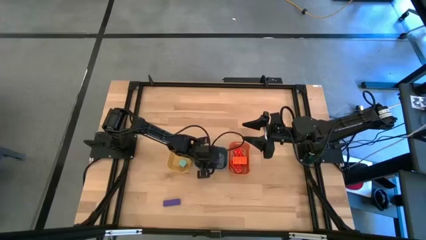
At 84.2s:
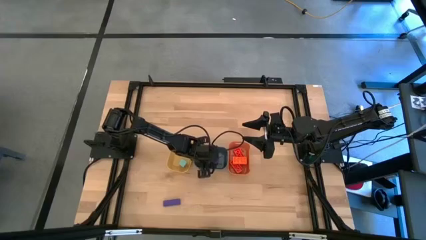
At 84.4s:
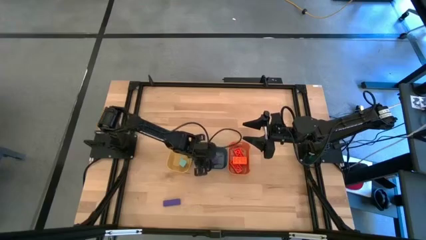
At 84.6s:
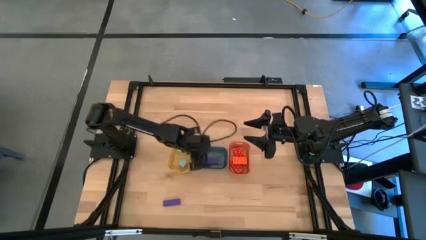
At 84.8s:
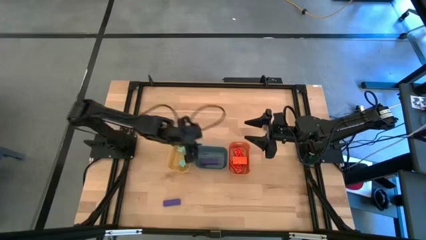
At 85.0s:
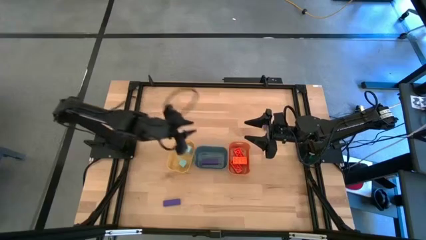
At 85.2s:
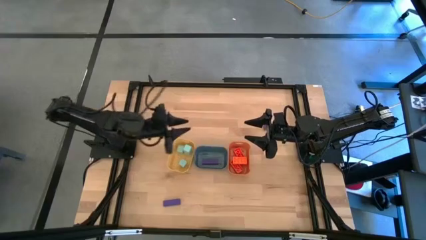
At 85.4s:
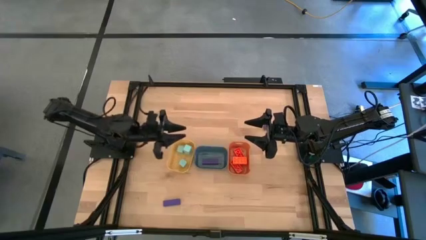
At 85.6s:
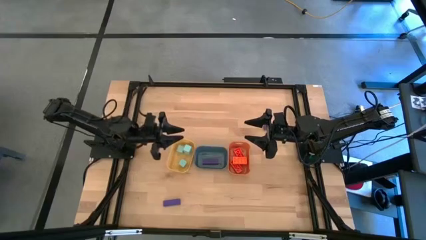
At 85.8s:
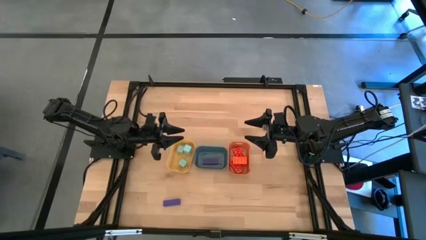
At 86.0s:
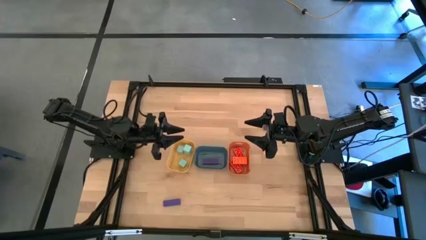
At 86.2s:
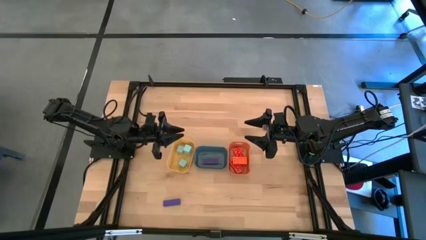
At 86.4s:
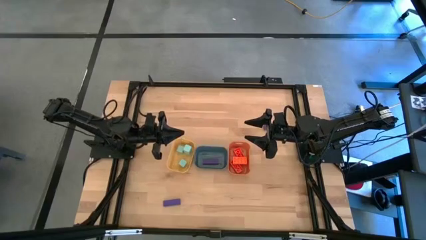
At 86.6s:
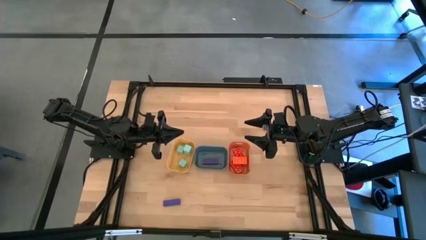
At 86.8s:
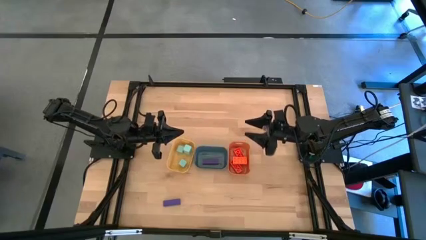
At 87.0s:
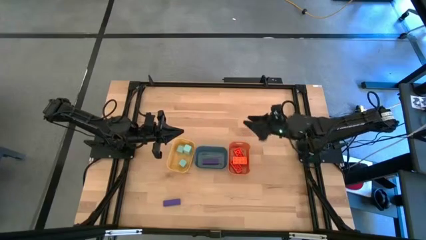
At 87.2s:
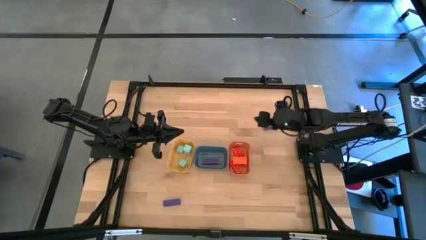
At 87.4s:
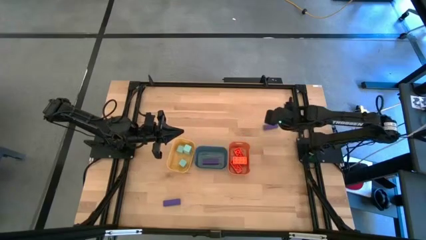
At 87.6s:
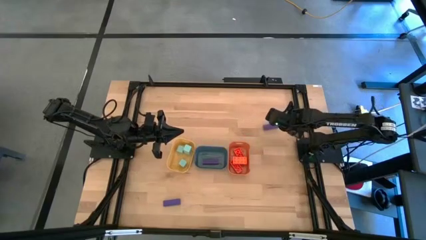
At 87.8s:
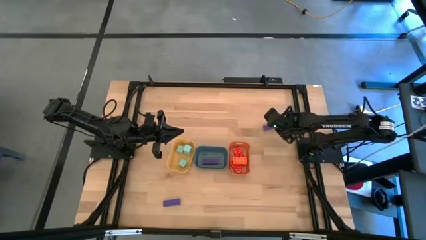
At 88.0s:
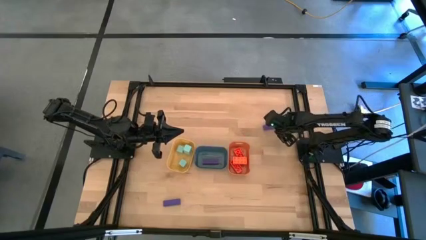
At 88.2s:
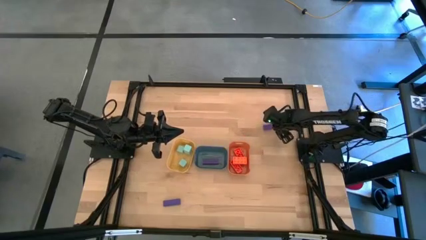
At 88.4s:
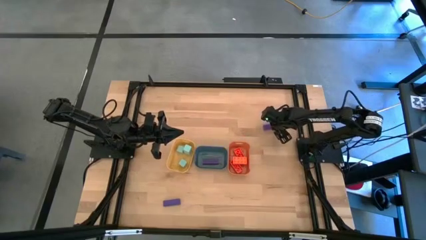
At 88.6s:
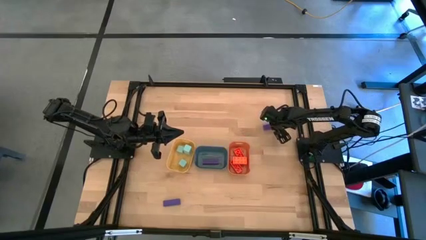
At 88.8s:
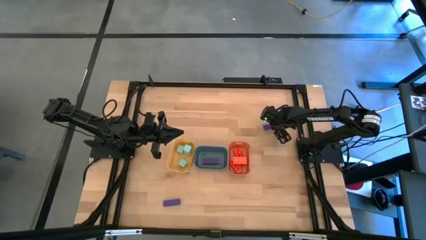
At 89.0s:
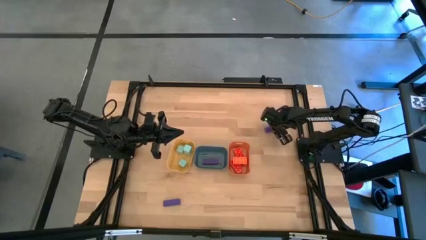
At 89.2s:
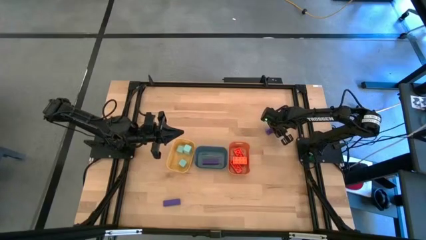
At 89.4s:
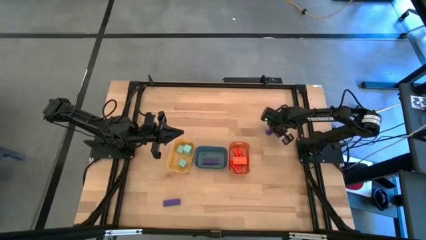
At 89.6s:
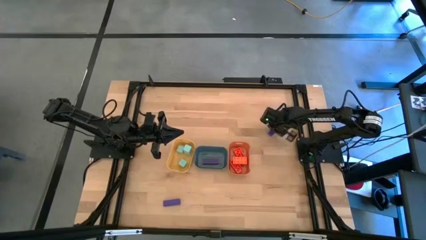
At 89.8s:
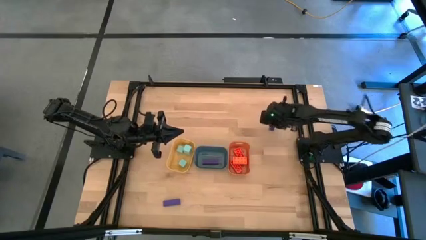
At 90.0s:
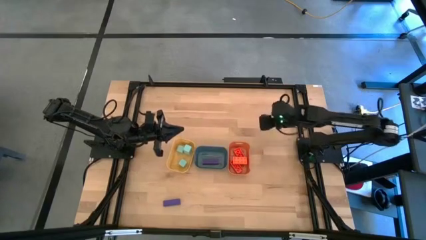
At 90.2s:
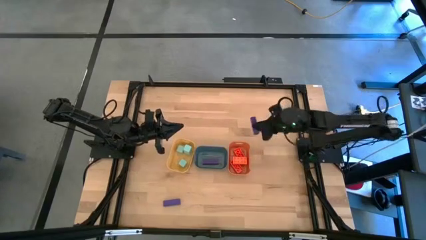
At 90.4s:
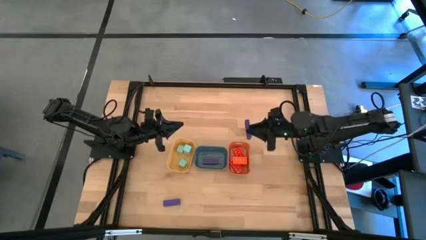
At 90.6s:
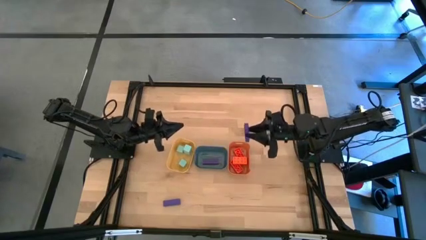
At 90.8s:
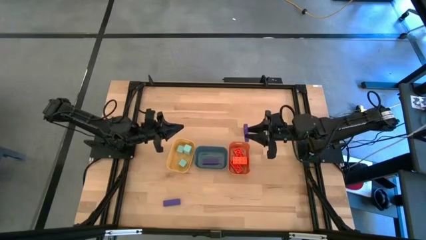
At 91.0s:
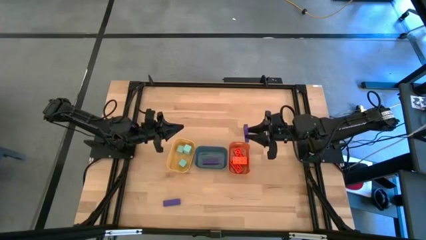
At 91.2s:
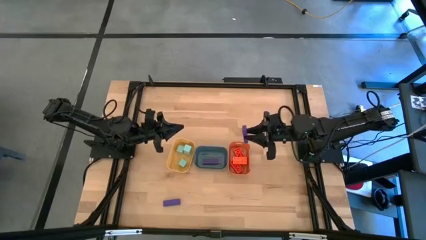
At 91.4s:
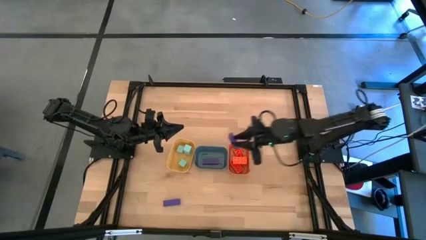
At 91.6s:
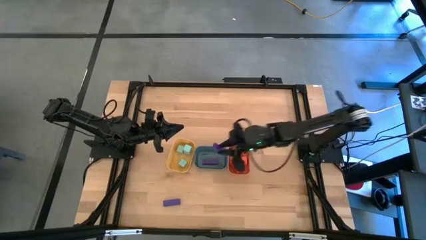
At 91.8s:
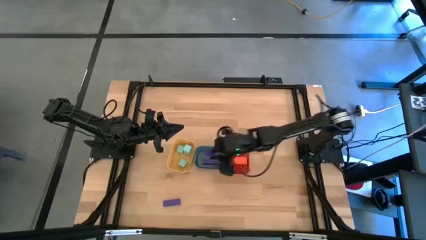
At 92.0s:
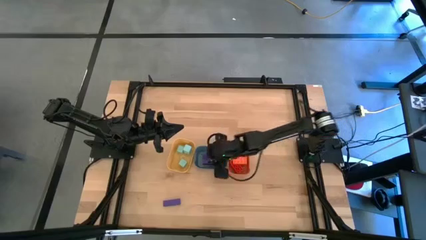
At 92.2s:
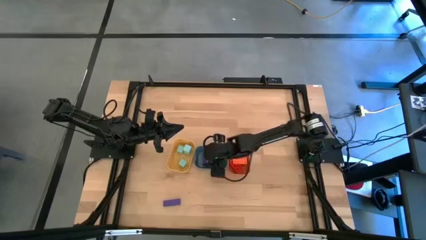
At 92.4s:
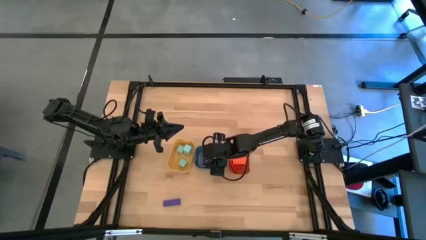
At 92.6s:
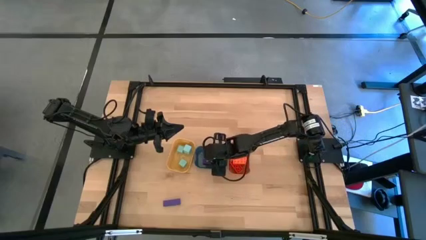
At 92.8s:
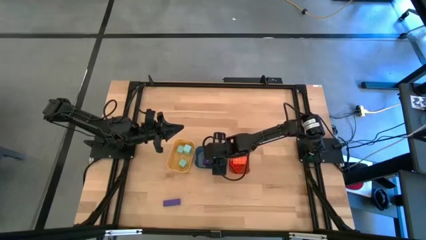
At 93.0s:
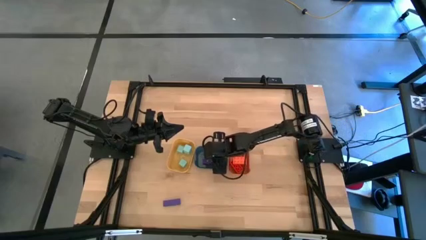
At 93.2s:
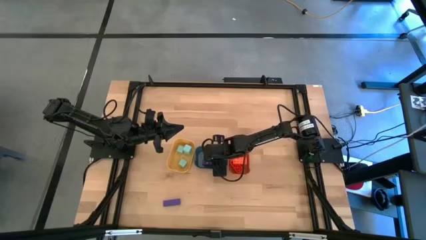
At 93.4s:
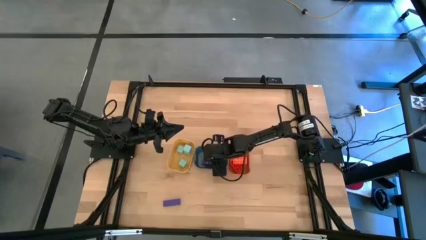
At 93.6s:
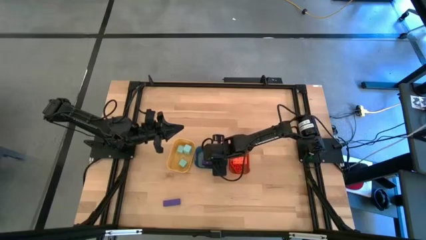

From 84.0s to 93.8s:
Task: Sort & place blocks by color
Put the top violet block into the blue bin

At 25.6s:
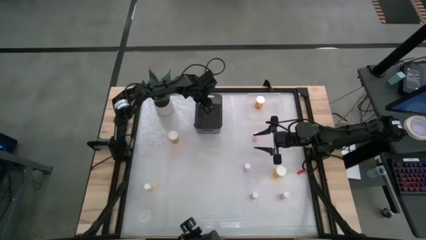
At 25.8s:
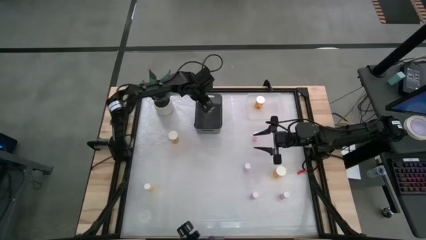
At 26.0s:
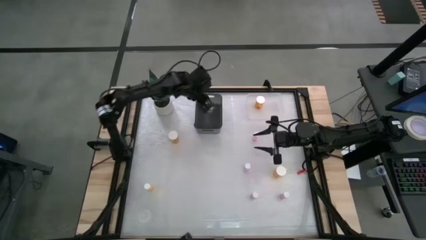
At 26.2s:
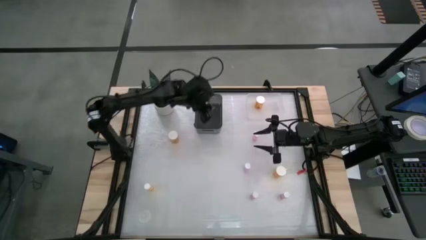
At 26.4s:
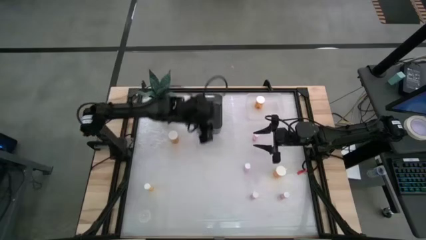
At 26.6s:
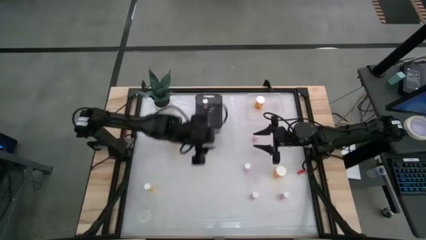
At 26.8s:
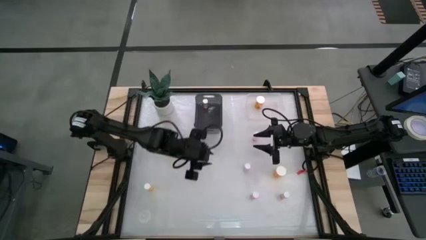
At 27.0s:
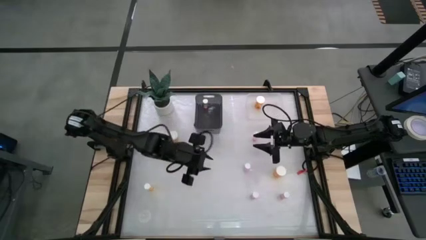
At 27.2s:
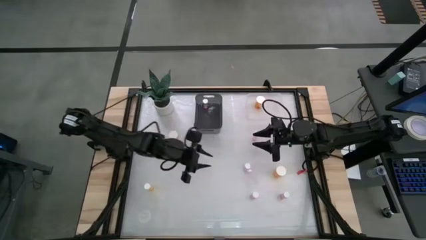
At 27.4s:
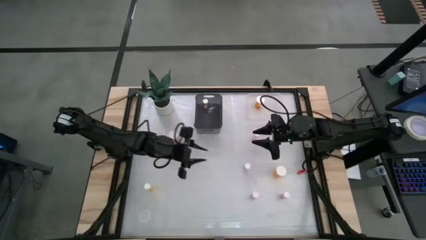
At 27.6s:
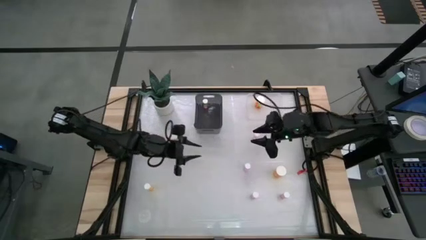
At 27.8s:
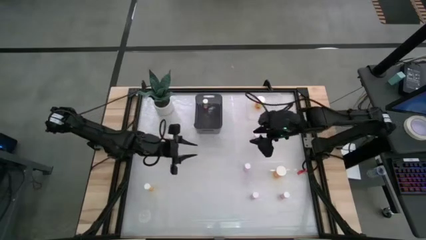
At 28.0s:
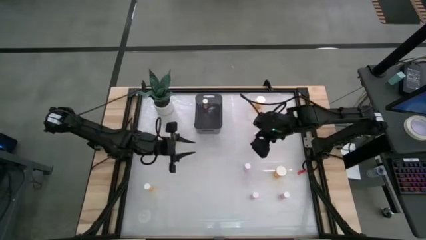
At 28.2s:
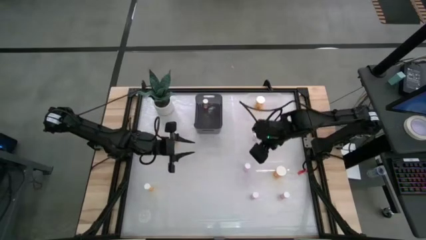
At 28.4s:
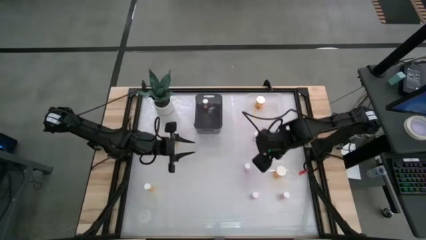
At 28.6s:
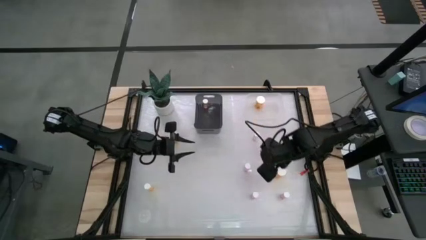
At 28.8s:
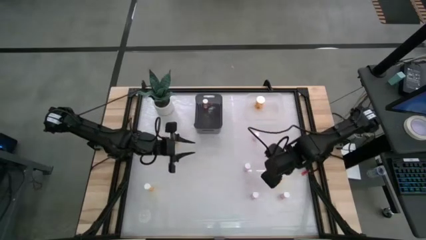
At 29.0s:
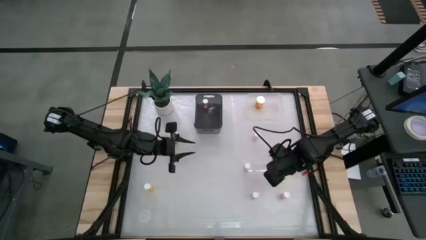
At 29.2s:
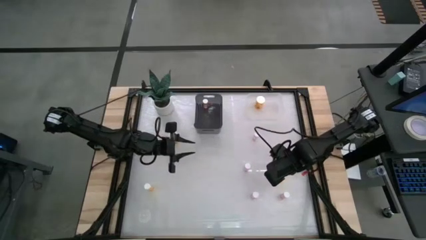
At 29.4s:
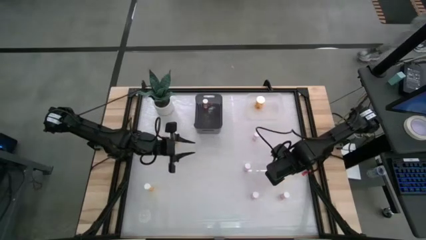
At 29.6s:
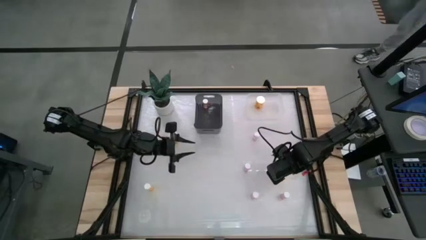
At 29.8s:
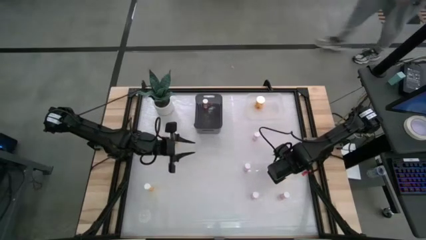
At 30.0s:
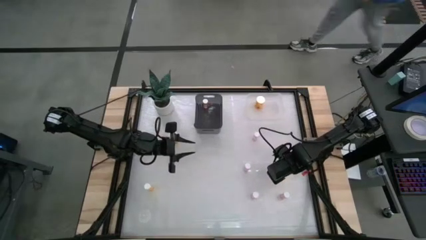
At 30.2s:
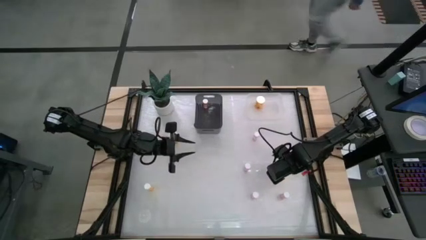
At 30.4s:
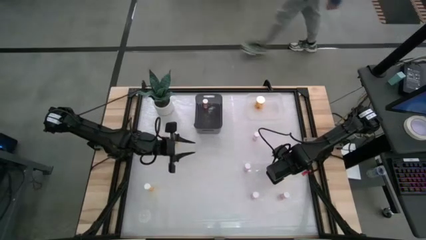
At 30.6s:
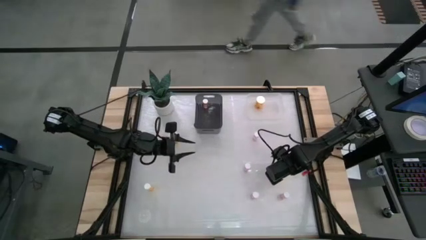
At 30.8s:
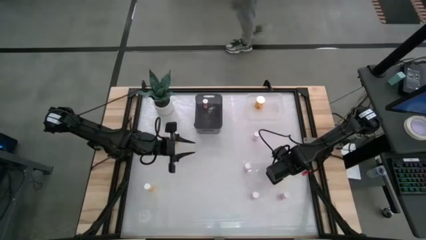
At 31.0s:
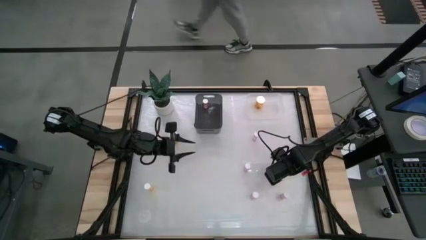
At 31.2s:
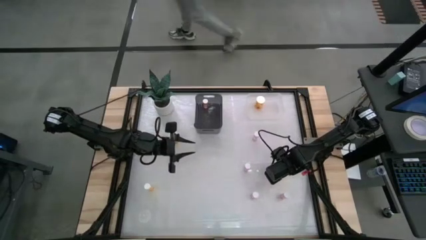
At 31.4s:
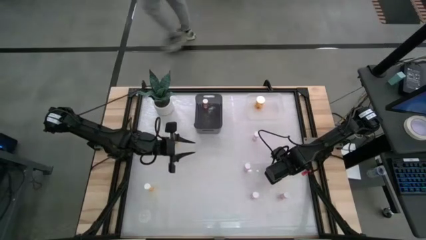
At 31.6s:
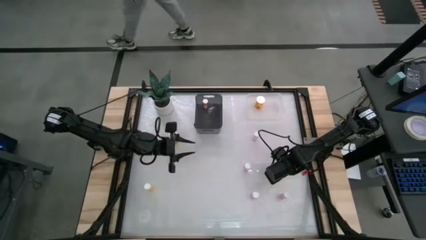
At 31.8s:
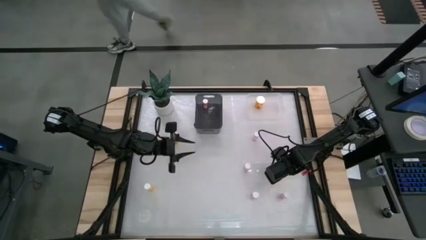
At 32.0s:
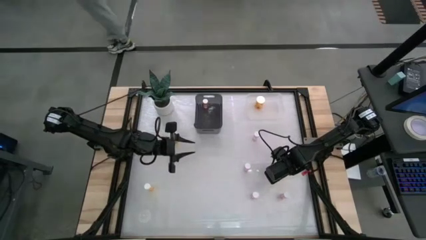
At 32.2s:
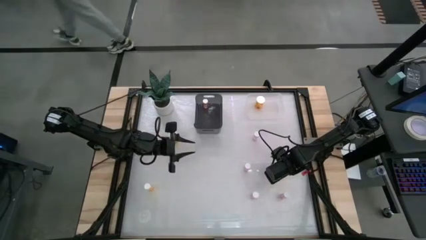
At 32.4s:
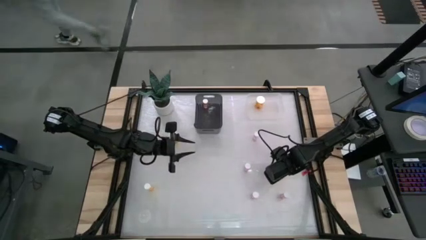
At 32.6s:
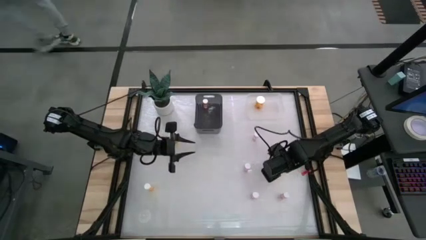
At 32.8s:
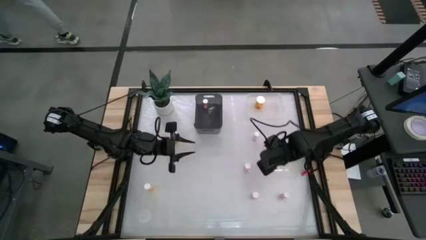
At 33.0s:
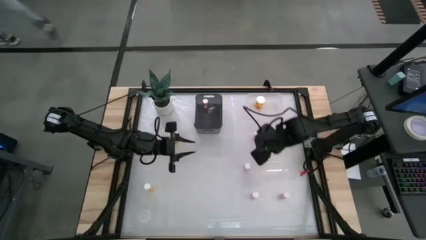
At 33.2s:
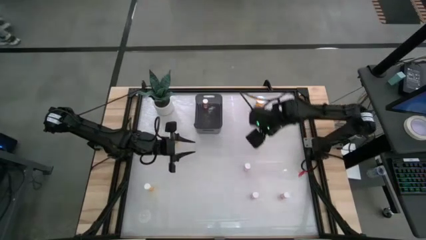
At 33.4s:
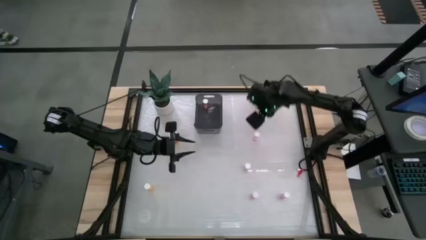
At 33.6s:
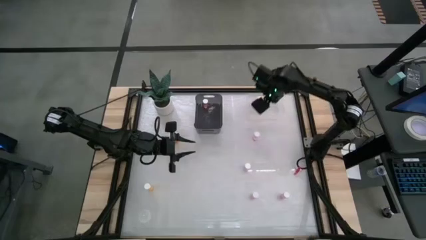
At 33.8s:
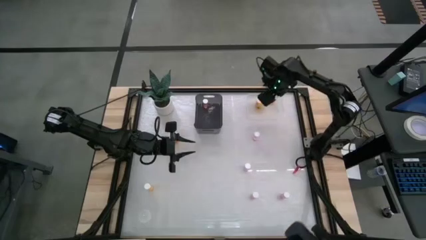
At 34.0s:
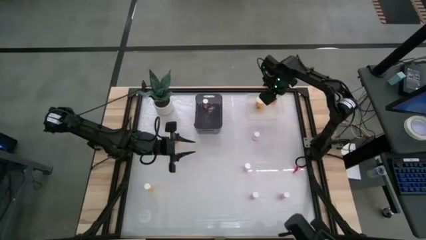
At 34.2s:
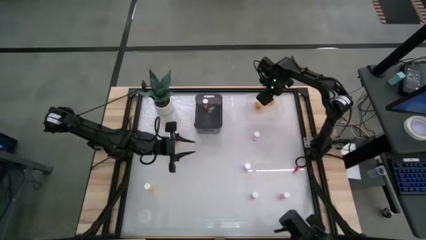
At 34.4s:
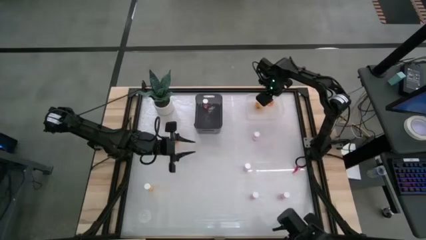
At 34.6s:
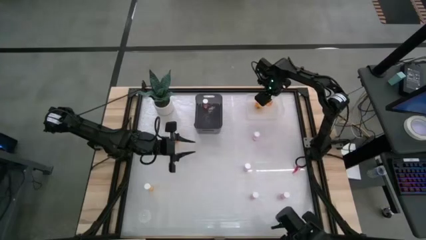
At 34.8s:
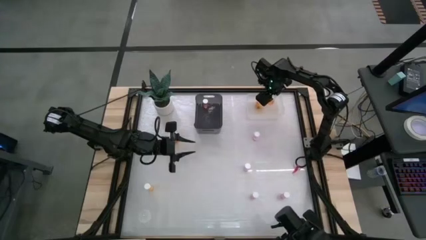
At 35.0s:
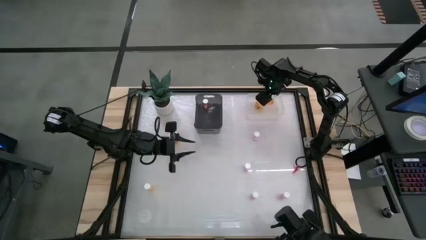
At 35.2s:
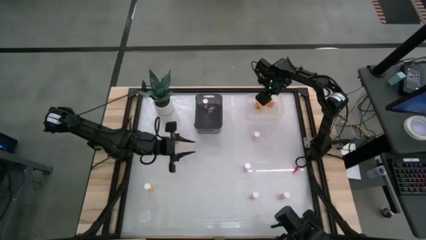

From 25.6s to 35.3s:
Task: Pick and place medicine bottles into bin by pill shape (circle, oval)
Put the large orange pill bottle into the transparent bin
